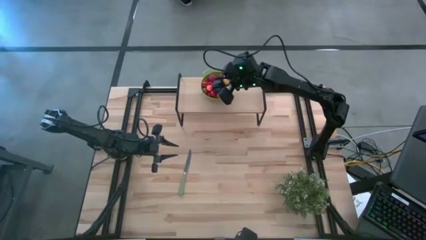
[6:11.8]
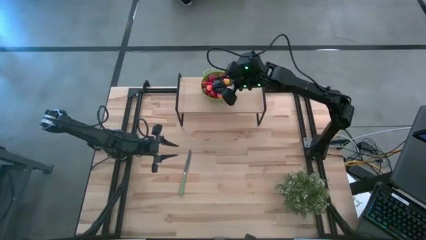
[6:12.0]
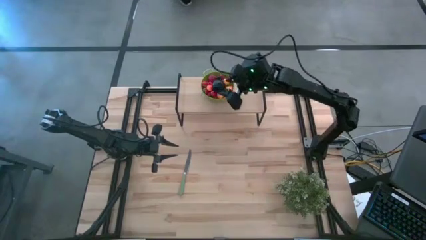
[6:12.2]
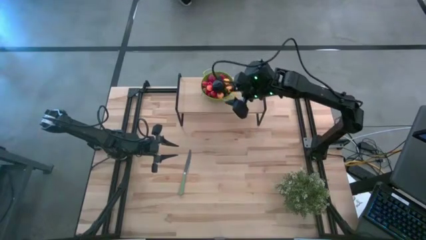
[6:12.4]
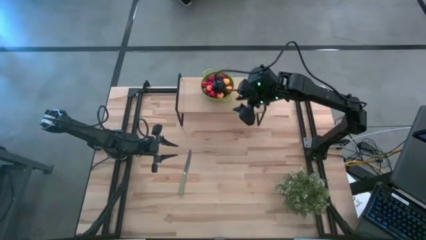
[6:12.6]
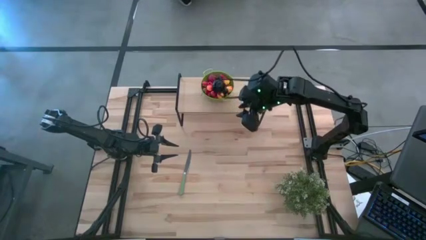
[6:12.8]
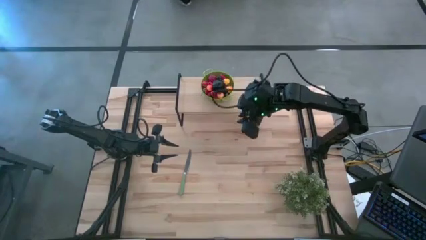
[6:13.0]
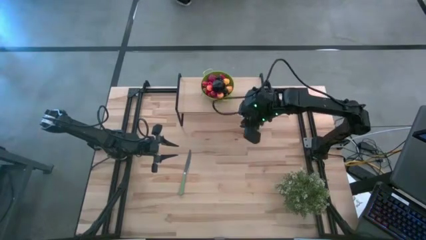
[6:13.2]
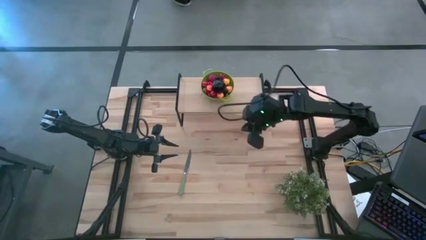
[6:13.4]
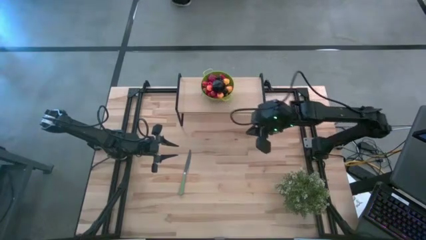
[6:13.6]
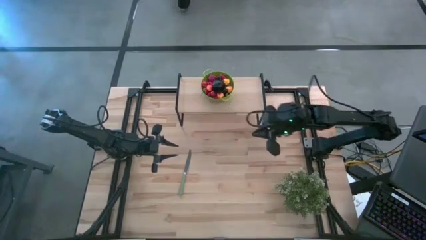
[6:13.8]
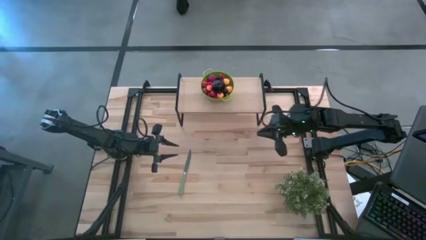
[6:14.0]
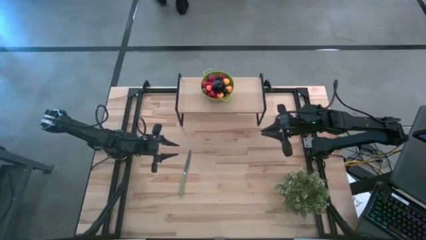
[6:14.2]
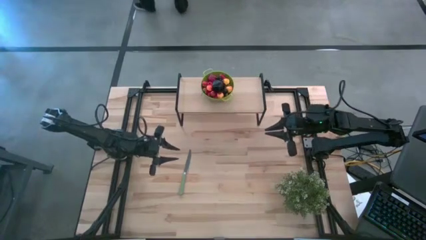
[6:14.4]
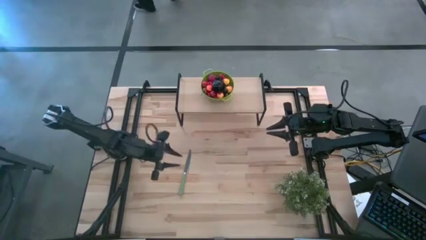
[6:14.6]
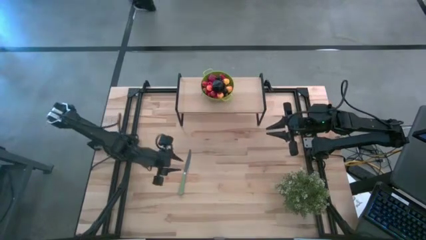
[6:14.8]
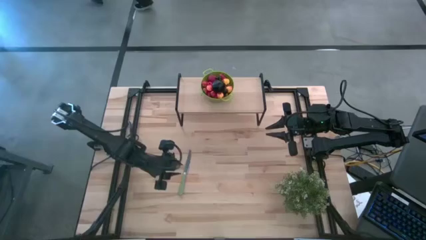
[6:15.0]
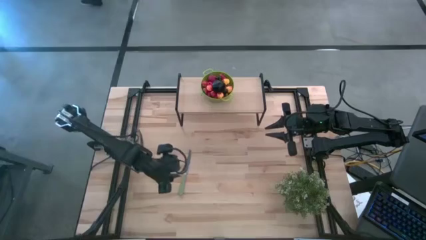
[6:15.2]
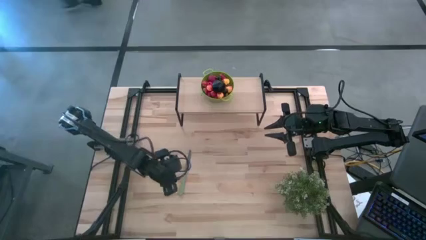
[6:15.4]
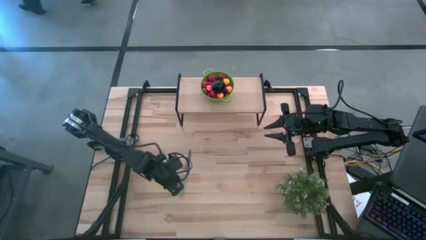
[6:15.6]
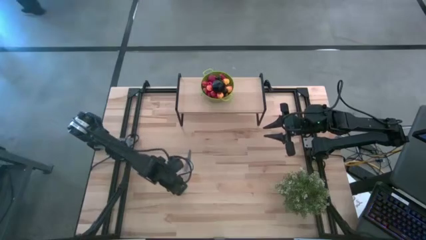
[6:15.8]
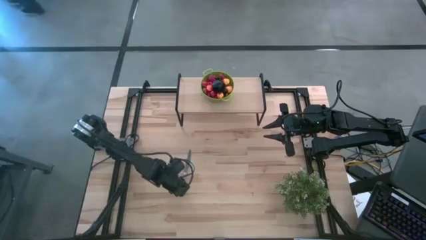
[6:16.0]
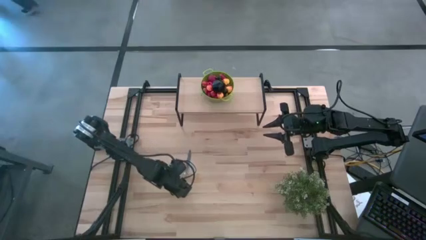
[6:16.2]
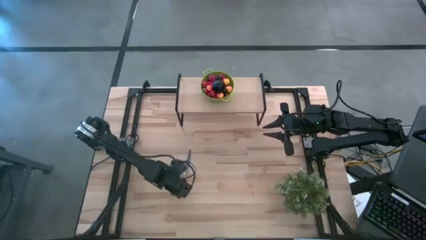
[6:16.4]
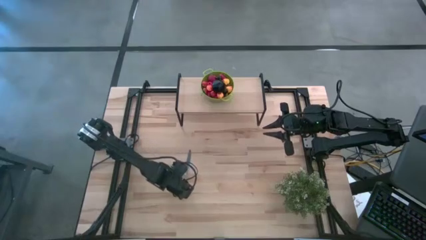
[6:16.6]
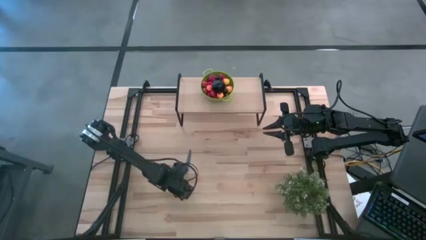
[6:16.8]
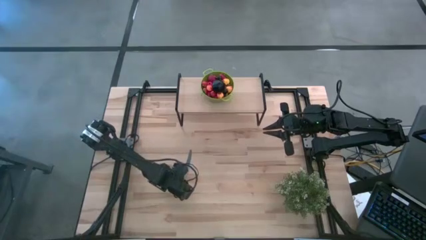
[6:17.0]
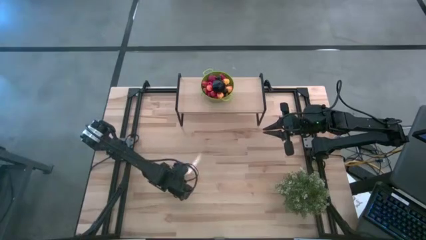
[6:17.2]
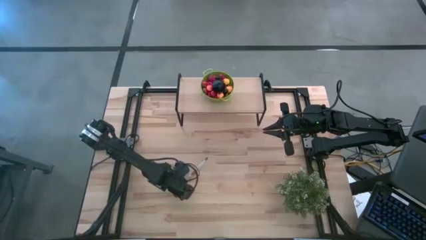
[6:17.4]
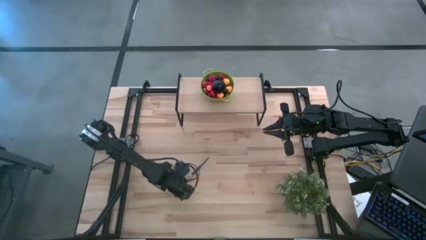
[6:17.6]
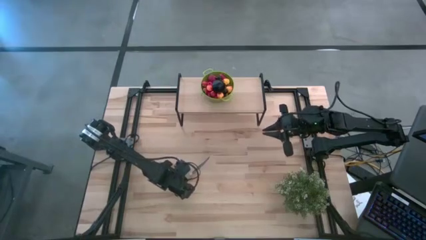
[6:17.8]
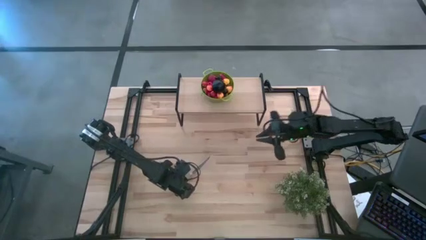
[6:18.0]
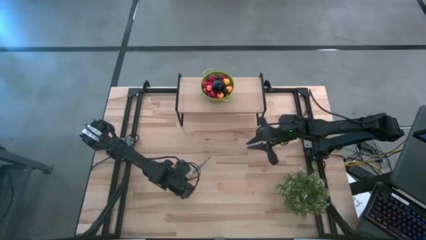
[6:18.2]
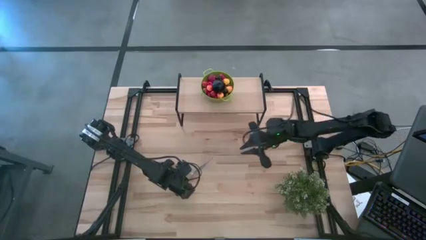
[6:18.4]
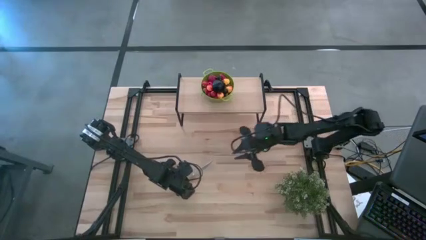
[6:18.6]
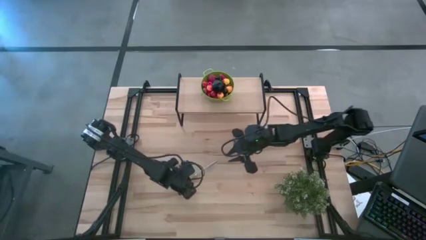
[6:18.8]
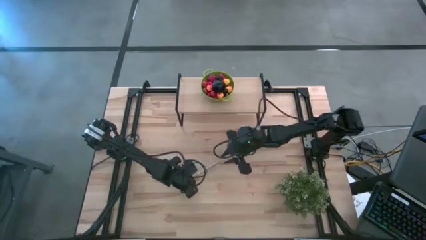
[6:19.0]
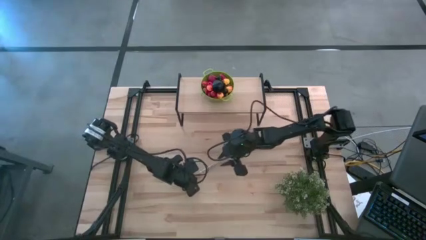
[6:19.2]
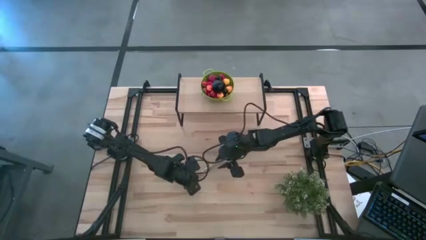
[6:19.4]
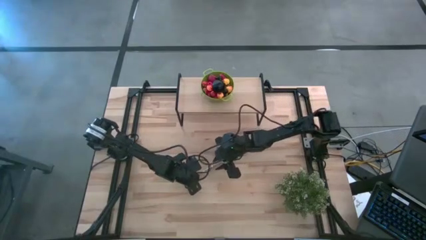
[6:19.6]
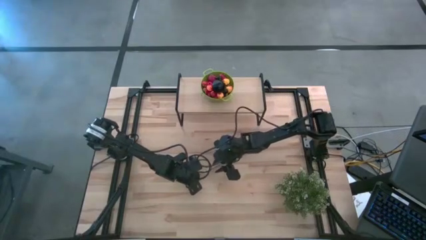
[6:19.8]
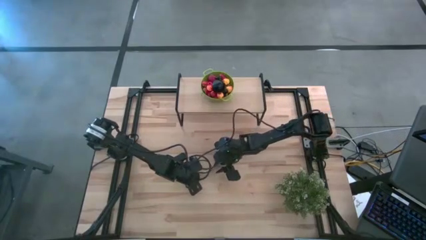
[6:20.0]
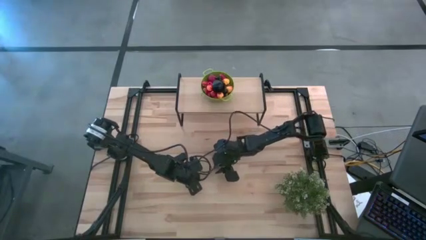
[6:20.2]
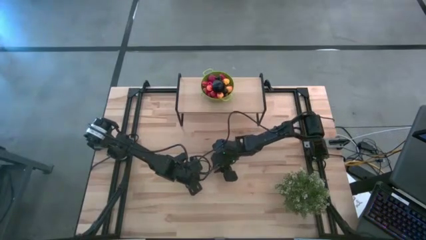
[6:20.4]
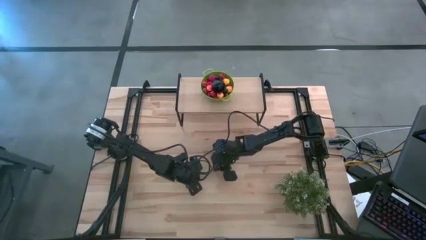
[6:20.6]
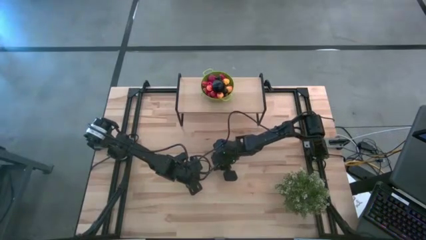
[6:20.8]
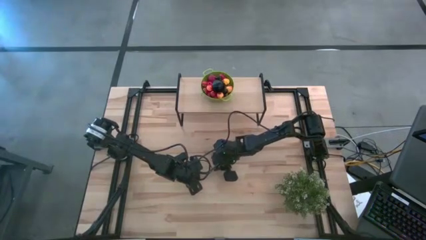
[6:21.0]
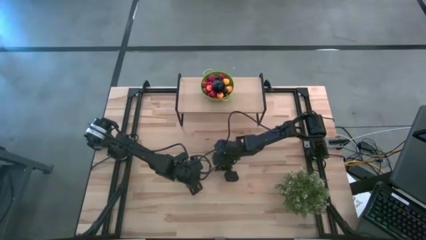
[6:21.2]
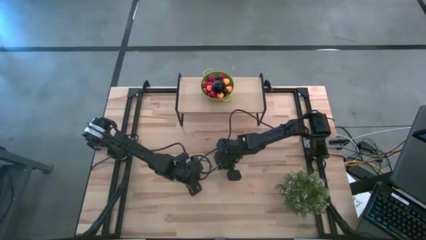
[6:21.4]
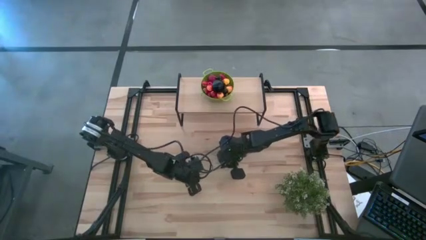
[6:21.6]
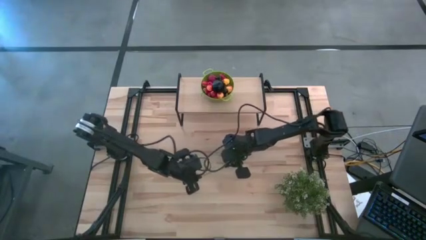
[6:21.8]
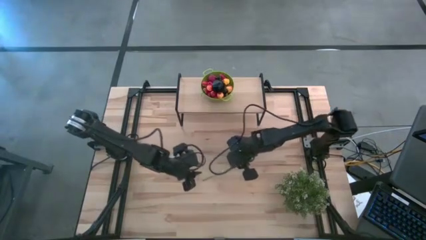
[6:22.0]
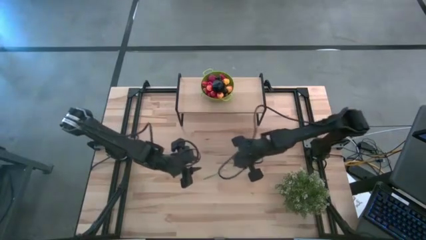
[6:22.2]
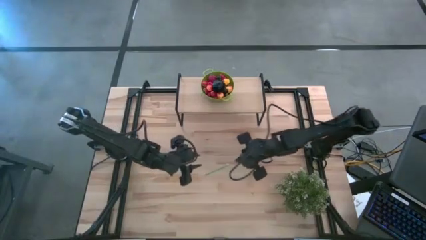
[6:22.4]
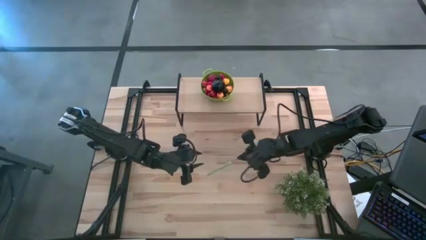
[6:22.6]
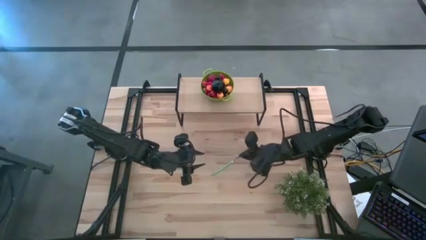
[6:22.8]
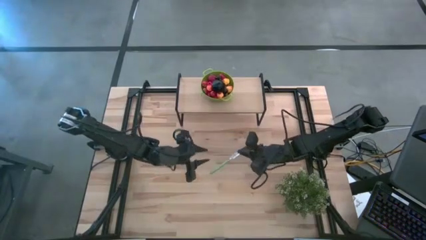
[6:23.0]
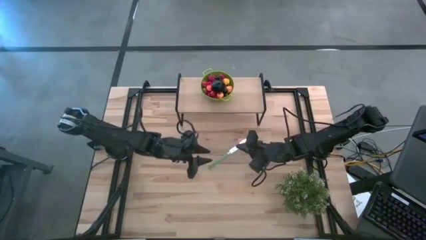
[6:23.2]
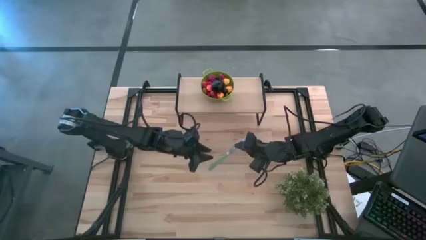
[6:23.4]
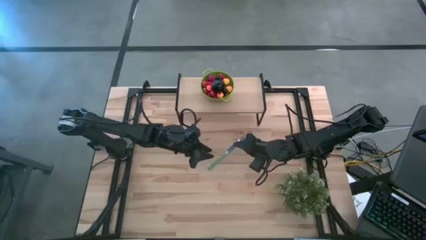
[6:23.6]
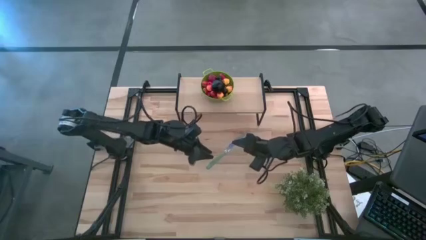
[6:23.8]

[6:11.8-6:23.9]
Task: Pick & Place Fruit
Put the green knife on the shelf to the left of the green colander
